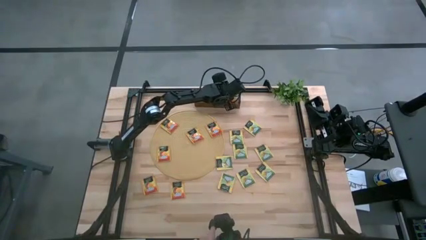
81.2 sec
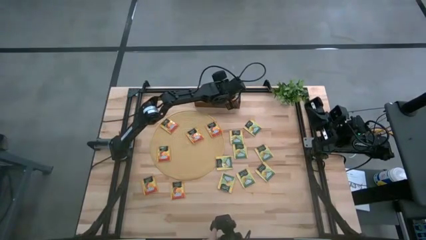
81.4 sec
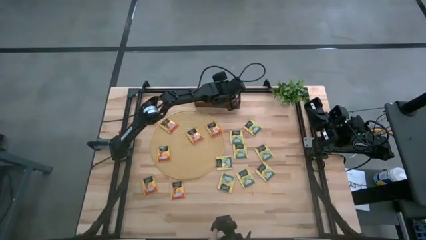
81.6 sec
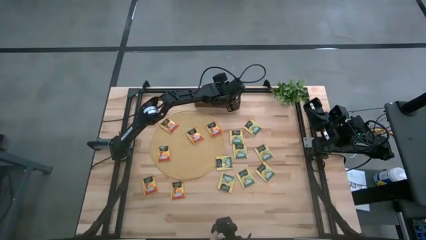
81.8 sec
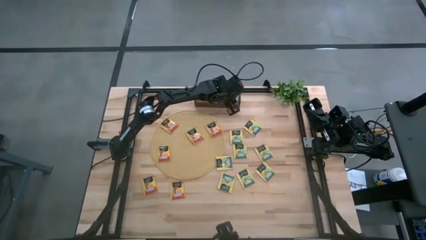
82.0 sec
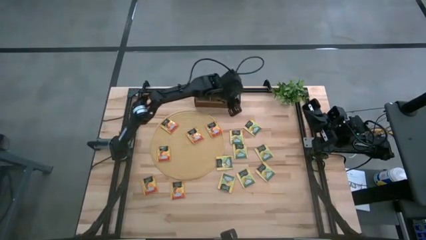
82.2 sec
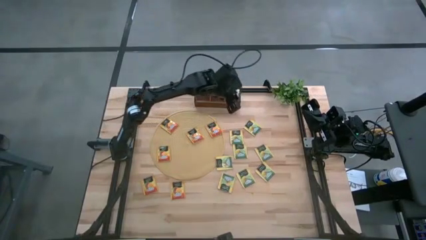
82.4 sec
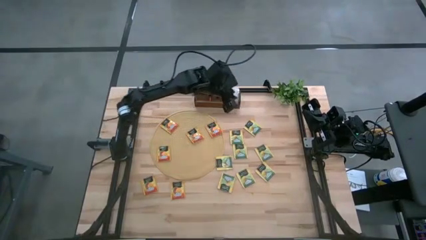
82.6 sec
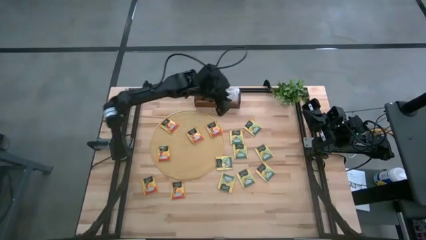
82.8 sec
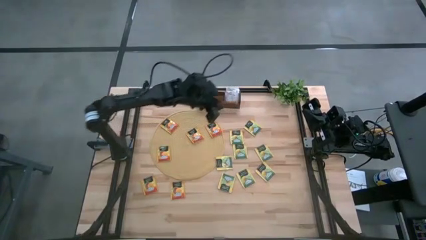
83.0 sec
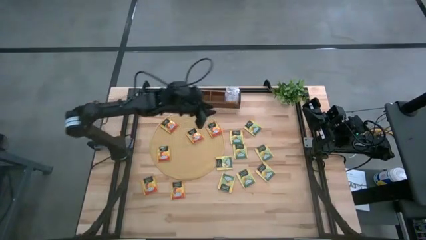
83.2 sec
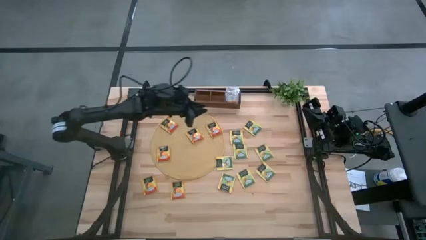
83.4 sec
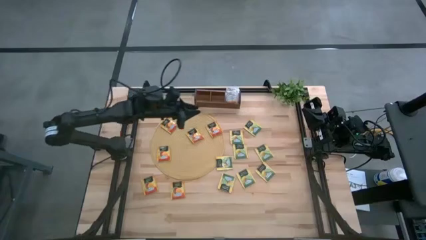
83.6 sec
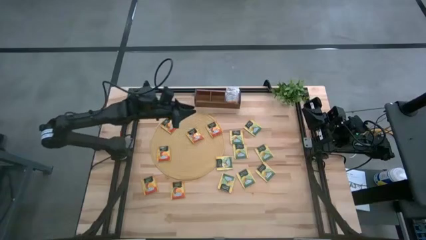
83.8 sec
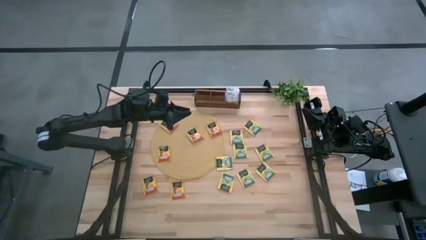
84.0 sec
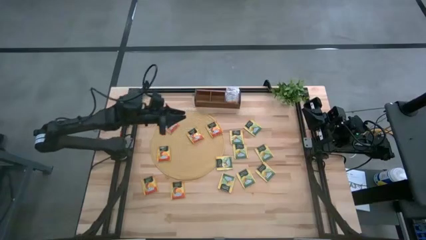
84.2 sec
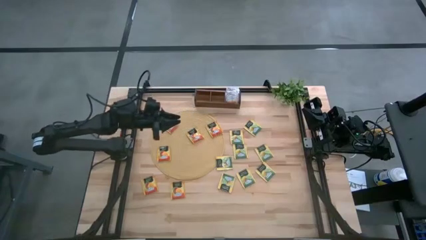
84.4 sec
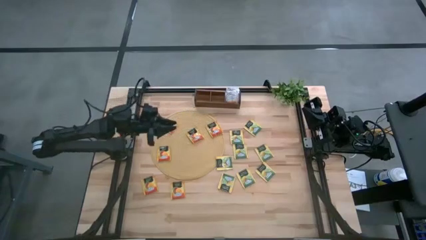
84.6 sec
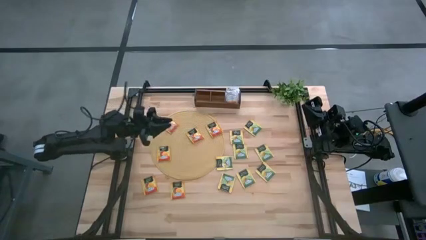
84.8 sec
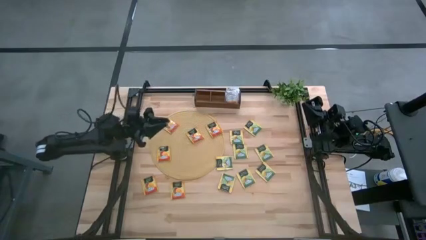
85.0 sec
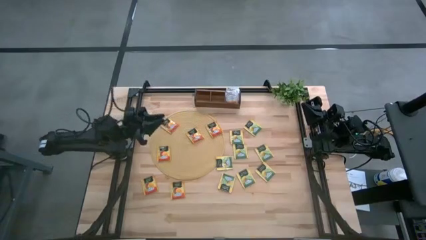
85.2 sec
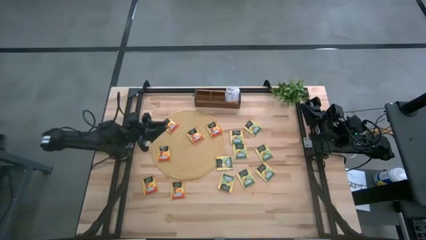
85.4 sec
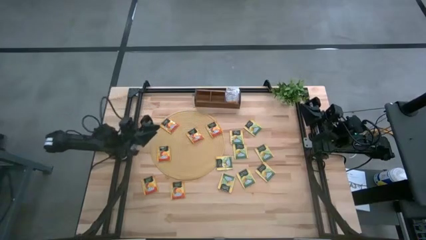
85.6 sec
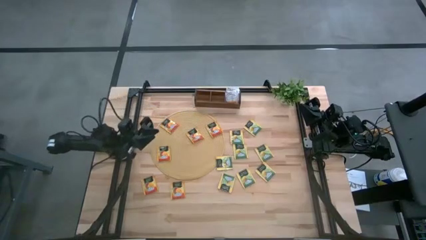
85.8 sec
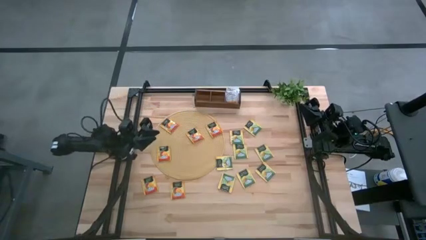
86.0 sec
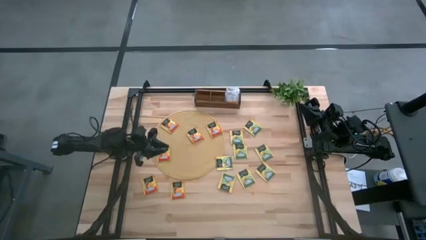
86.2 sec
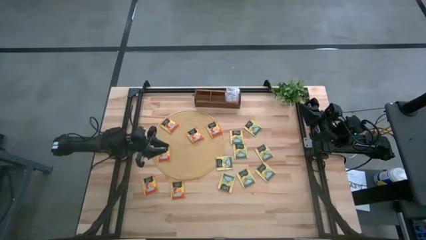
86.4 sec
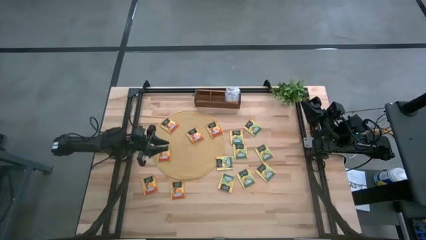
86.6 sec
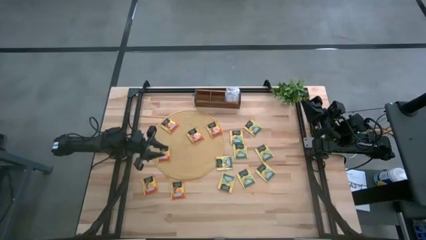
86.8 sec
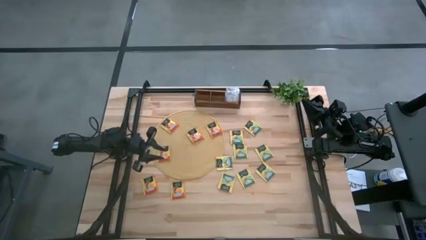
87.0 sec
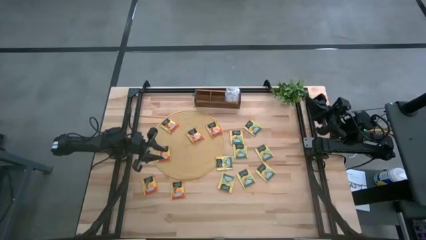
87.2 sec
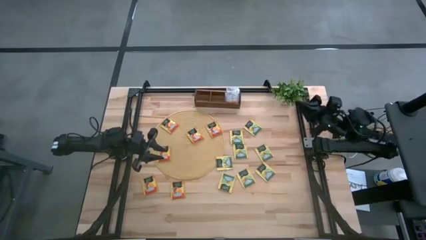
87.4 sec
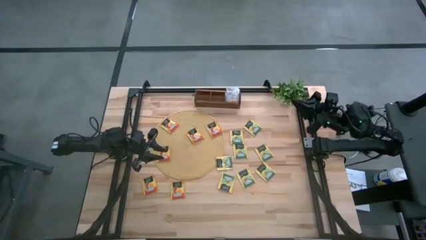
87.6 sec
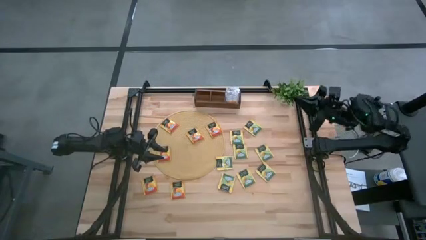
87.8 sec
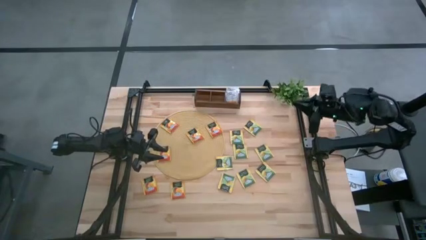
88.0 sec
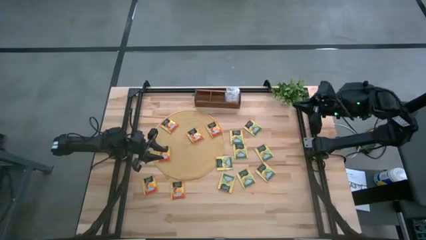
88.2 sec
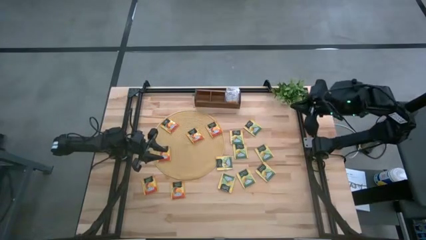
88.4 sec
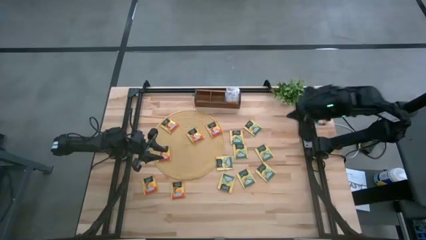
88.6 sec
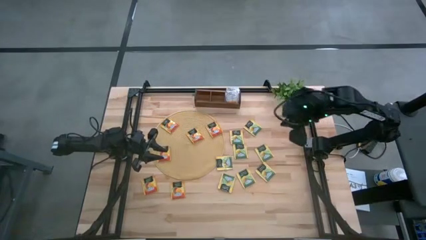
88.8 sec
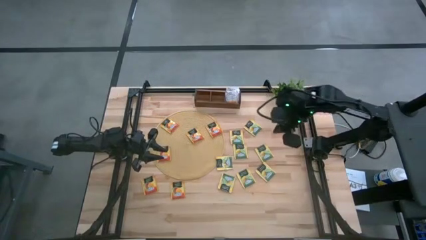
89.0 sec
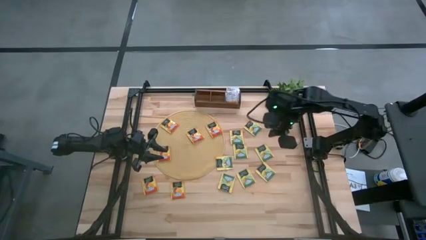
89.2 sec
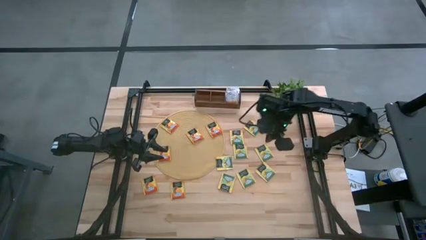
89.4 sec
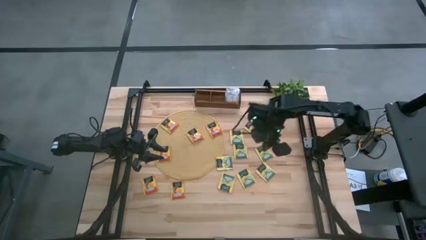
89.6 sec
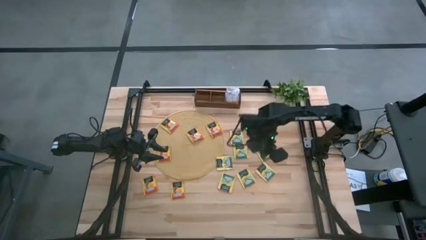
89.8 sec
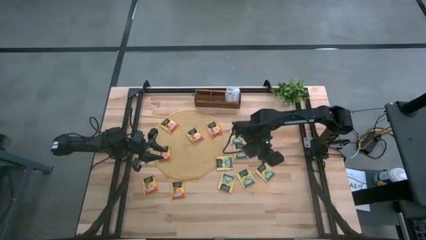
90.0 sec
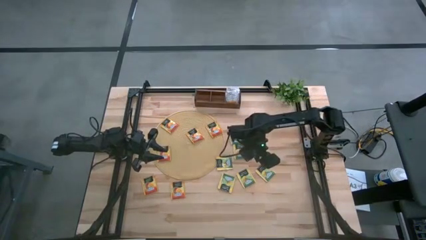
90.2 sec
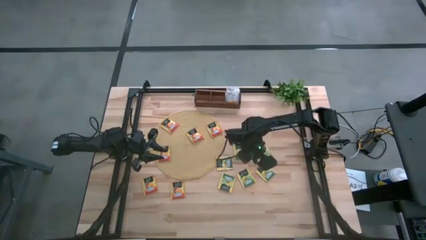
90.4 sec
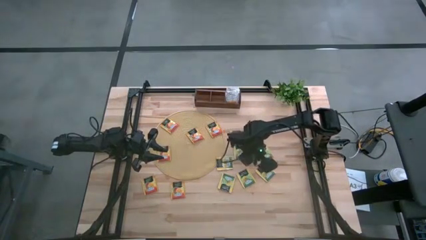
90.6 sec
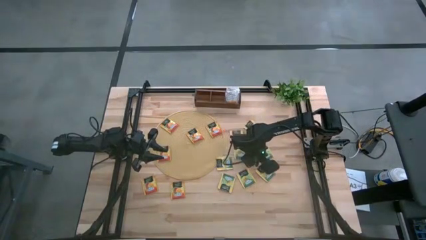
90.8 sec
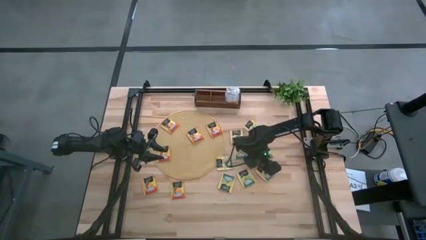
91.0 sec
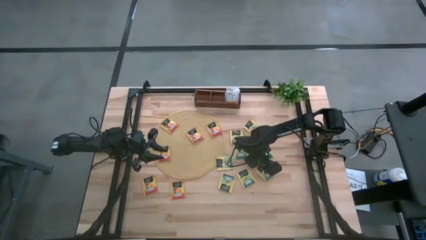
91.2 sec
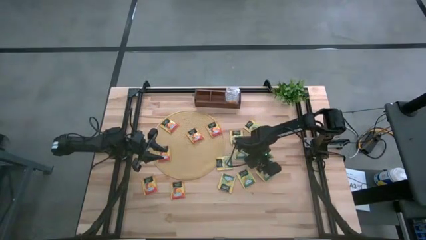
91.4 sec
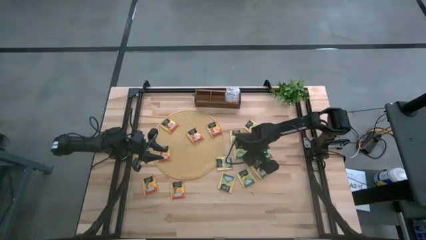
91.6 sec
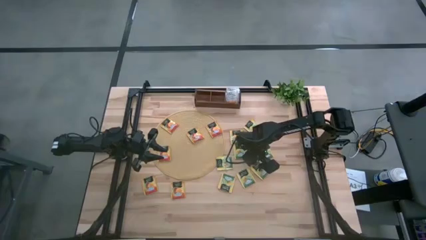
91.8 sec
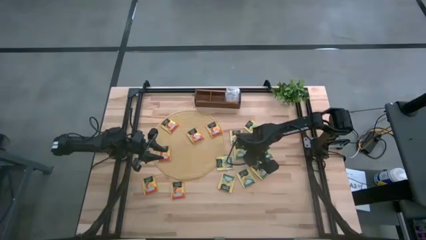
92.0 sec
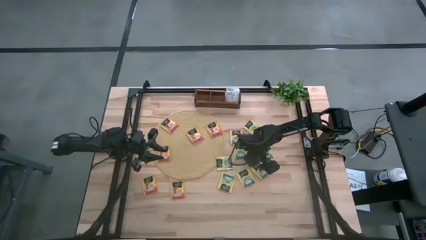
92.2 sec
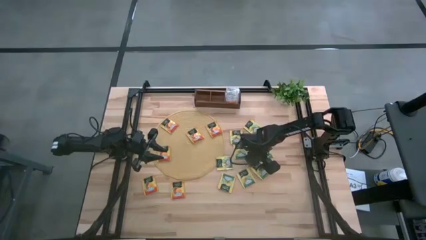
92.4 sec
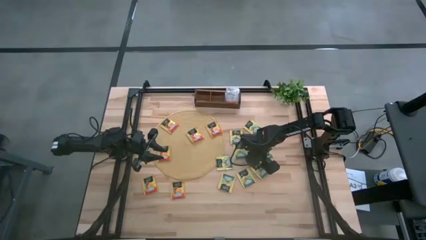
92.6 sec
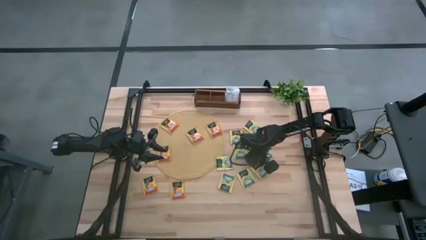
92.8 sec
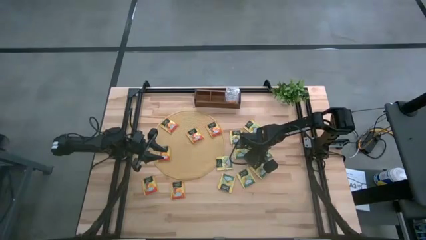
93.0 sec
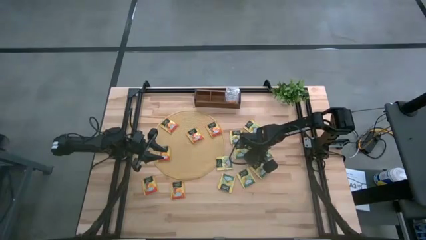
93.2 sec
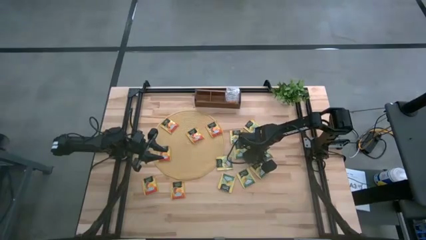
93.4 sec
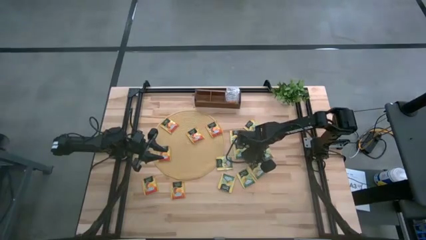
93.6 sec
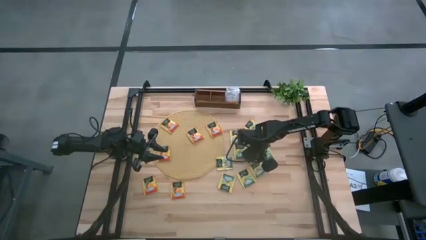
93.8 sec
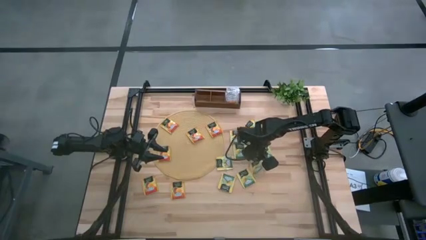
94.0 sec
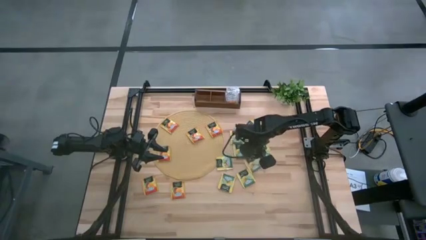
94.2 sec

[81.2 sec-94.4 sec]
Task: Pick & Place Tea
Put the yellow tea bag into the middle section of the wooden organizer

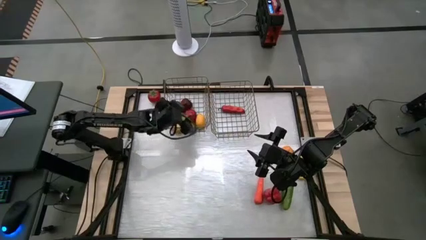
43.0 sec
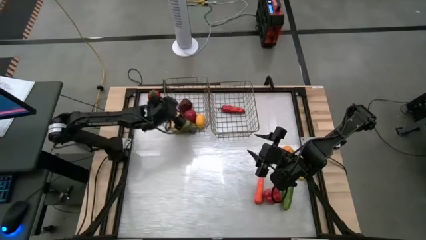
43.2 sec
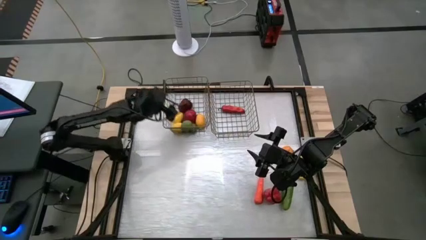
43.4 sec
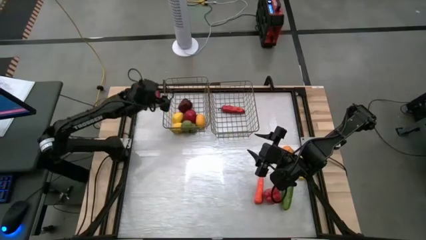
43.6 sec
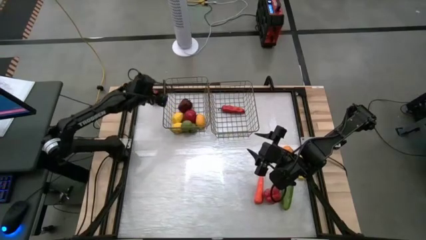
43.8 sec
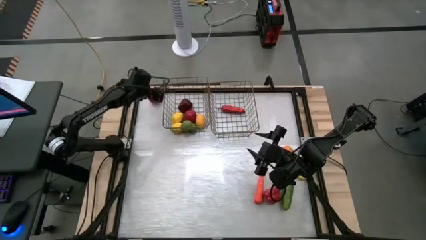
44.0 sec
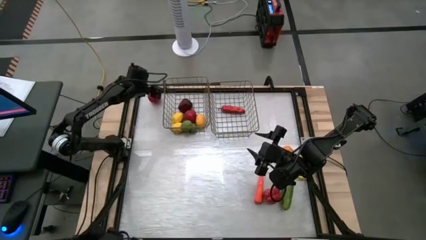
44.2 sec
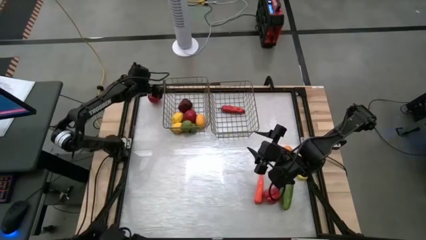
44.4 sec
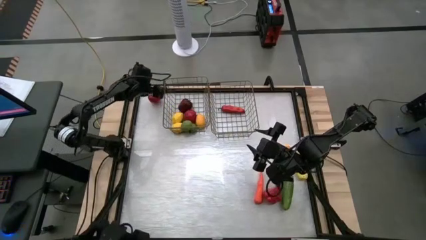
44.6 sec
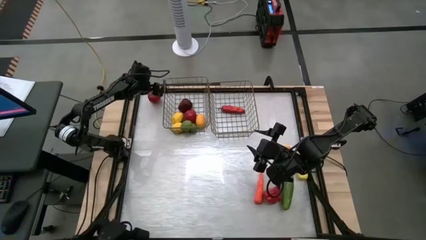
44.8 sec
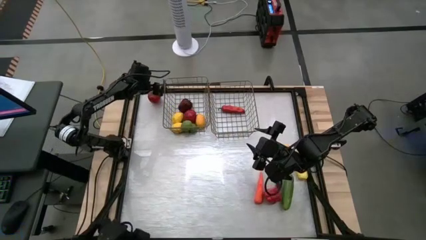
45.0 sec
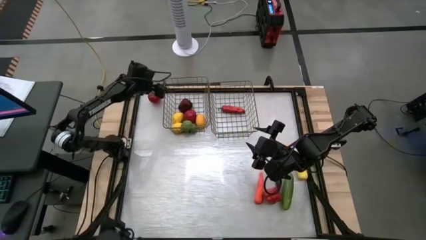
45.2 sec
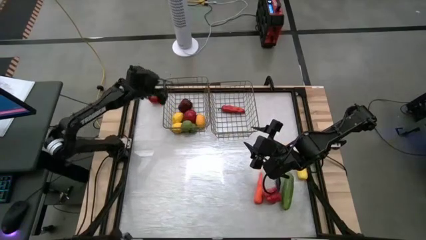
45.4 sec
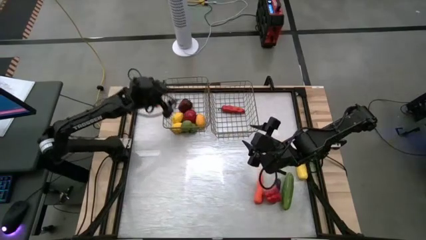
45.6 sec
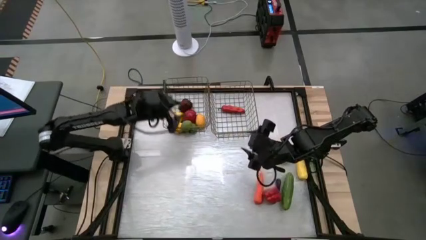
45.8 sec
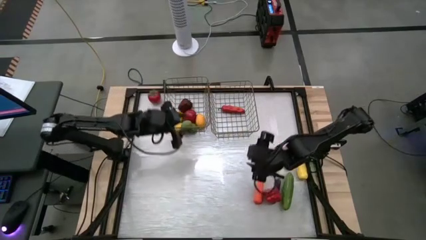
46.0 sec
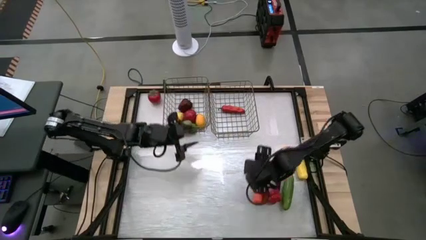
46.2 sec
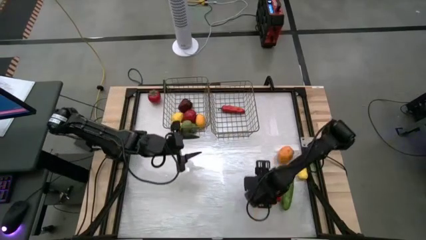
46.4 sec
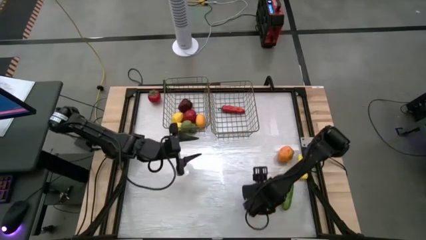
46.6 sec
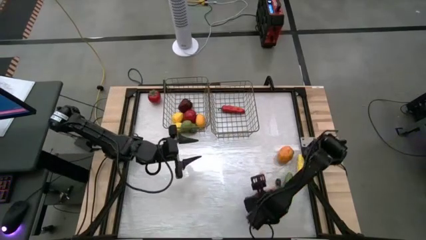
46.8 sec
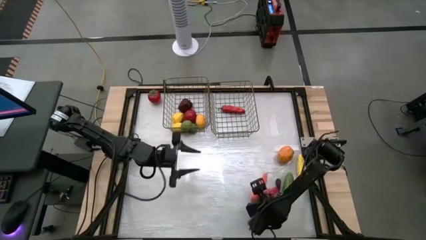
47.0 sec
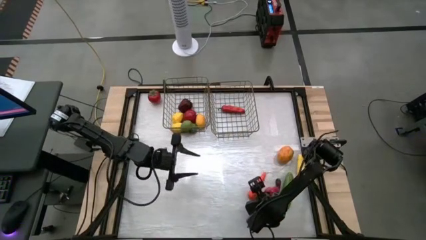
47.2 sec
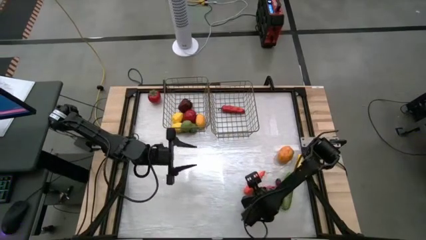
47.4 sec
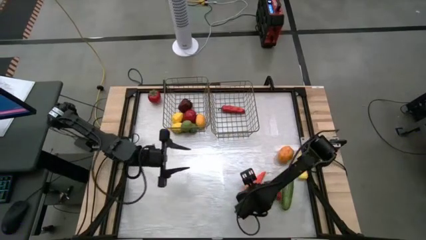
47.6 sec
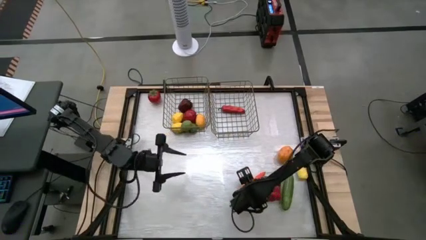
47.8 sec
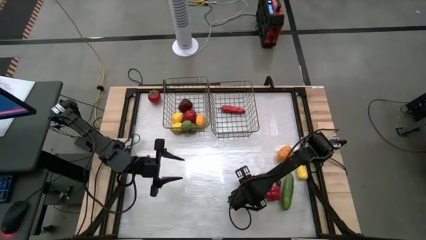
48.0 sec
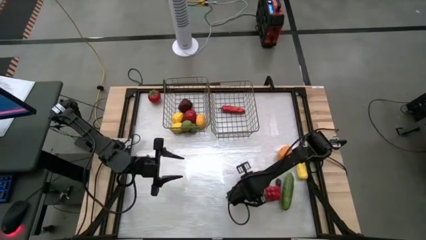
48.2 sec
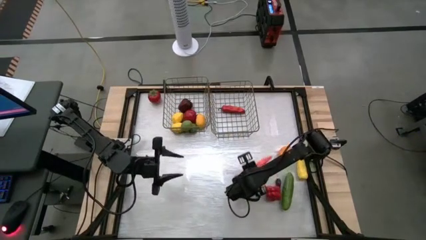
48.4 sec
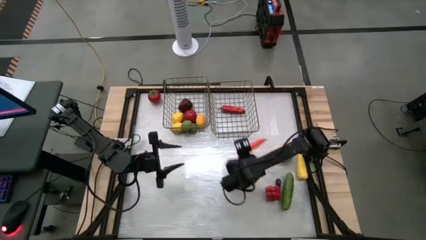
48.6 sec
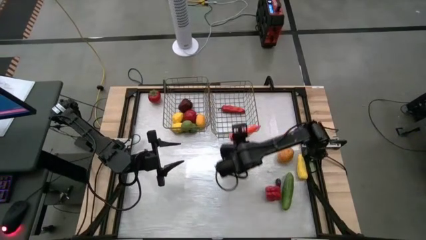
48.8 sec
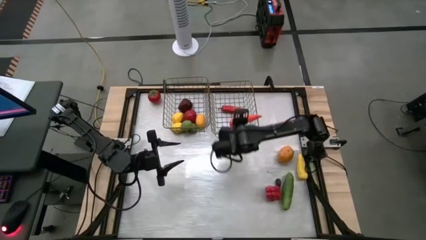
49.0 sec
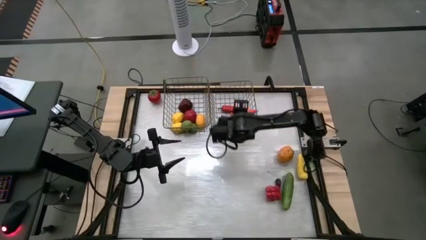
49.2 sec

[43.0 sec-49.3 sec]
Task: Sort produce into baskets
Put the carrot into the right wire basket
